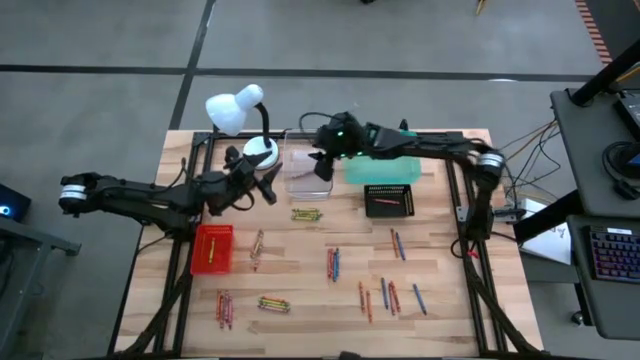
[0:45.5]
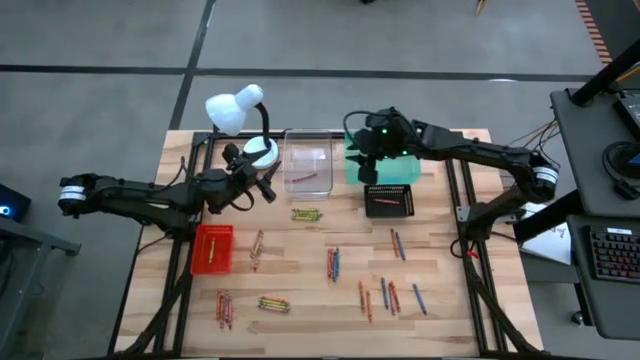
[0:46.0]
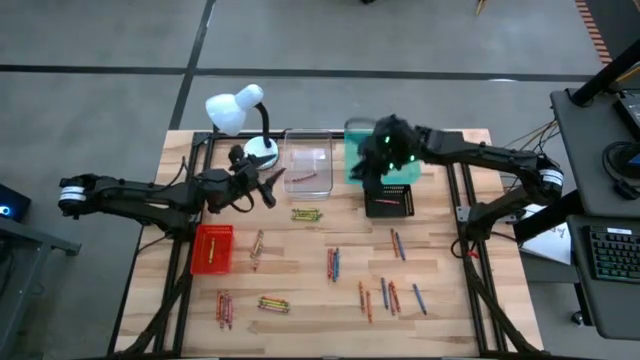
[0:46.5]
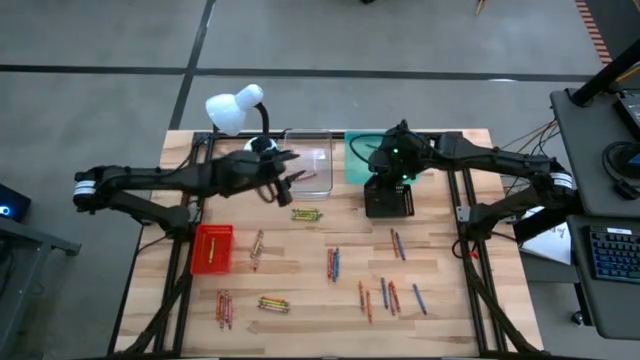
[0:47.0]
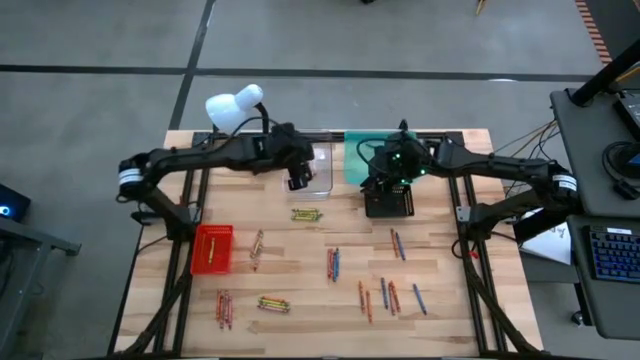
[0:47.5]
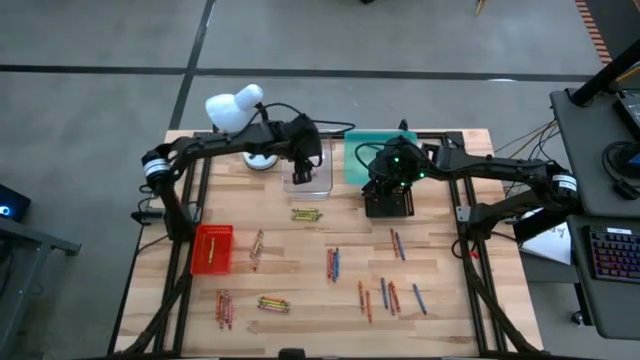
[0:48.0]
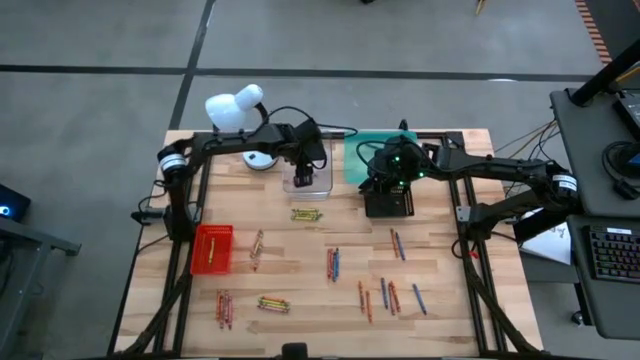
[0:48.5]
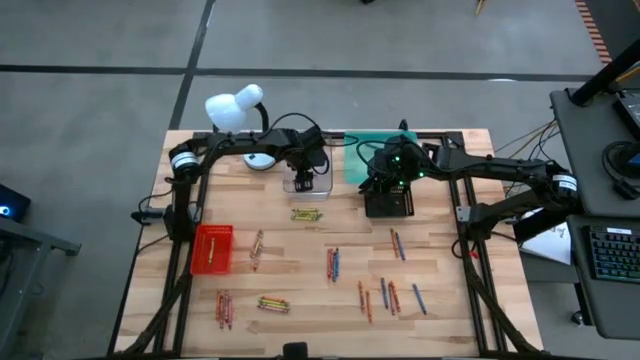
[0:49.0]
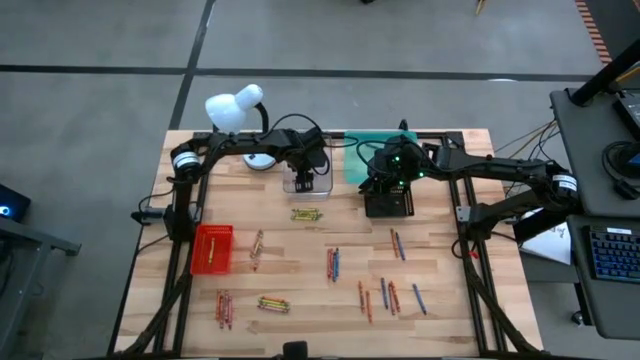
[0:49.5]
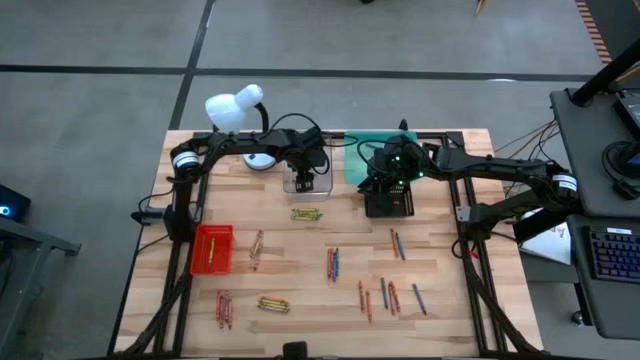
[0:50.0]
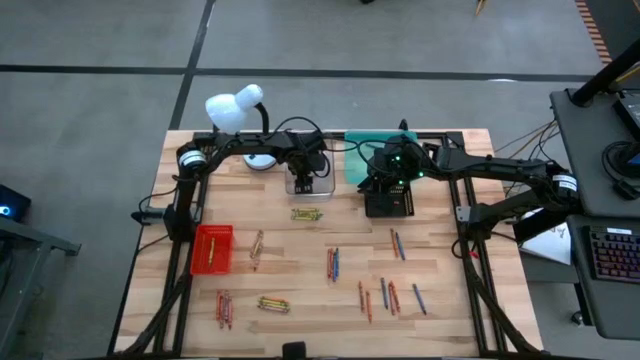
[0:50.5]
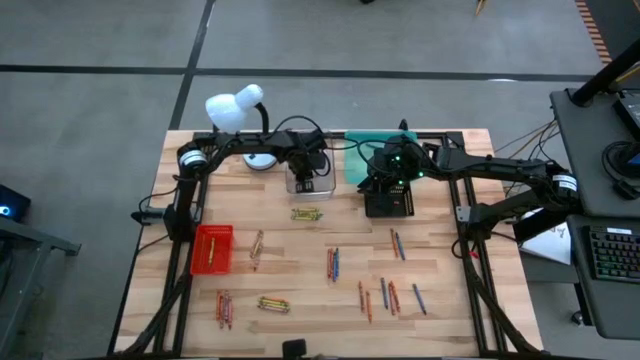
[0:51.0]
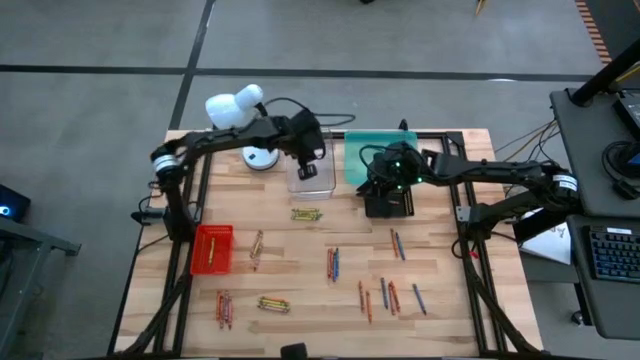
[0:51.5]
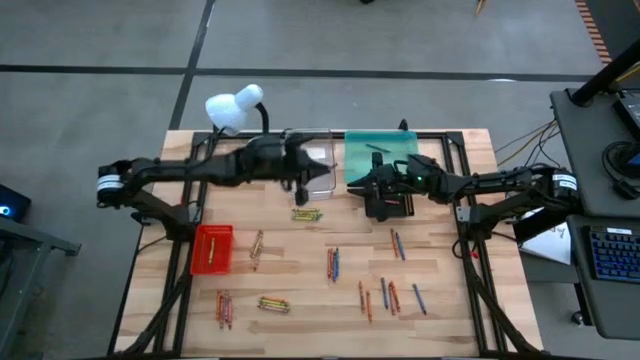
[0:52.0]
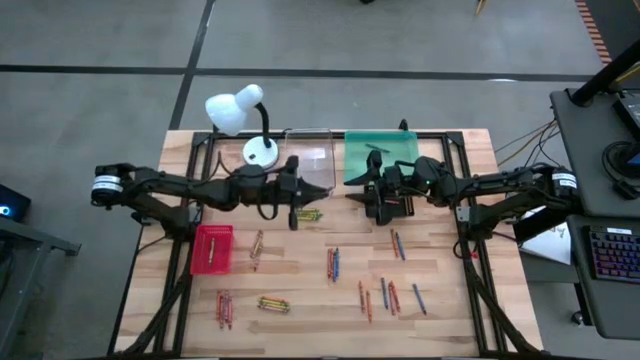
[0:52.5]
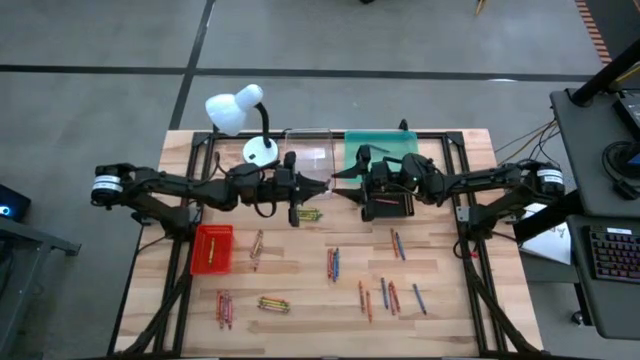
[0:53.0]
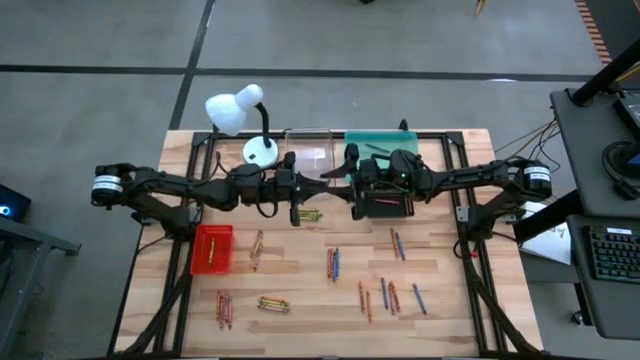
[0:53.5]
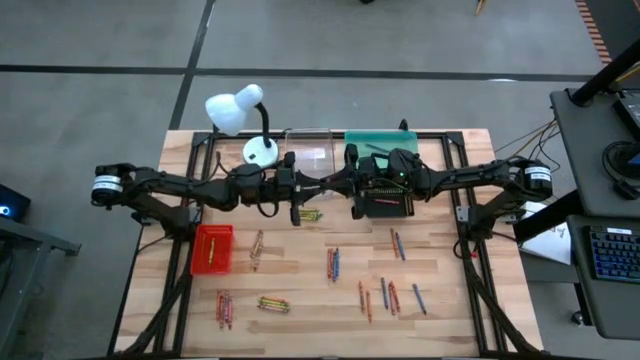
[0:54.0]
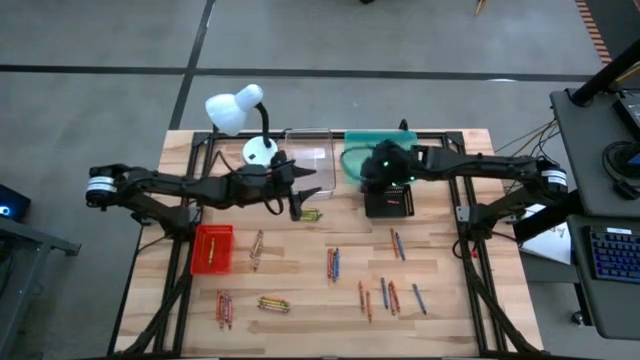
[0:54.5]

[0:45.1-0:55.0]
Task: Sort crayons
Put the red crayon into the black bin

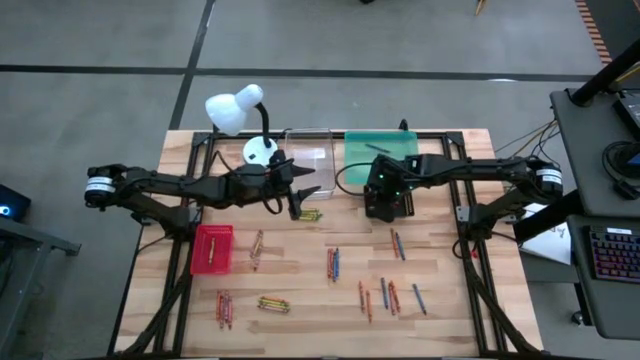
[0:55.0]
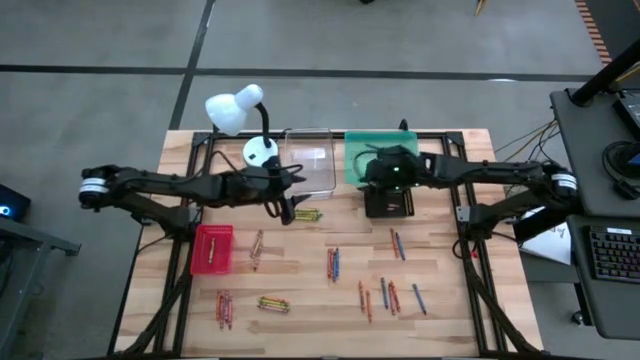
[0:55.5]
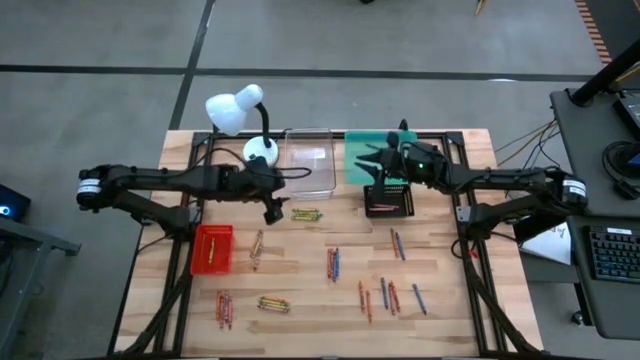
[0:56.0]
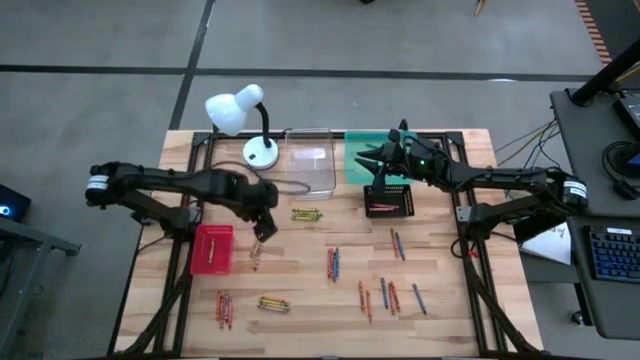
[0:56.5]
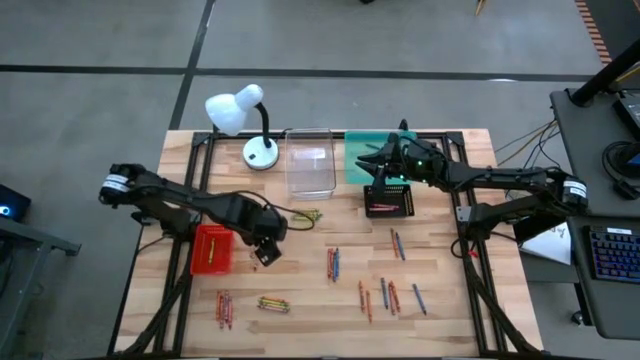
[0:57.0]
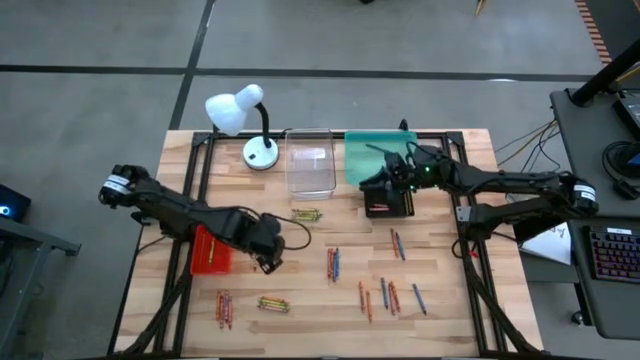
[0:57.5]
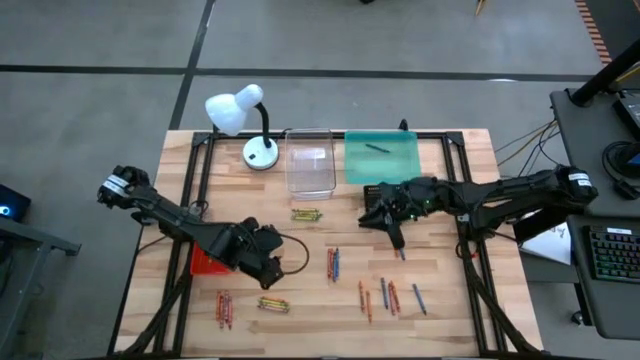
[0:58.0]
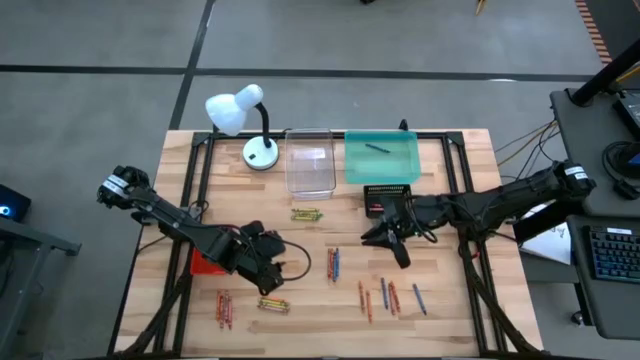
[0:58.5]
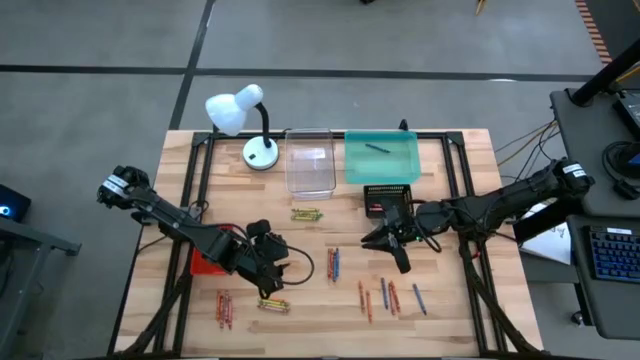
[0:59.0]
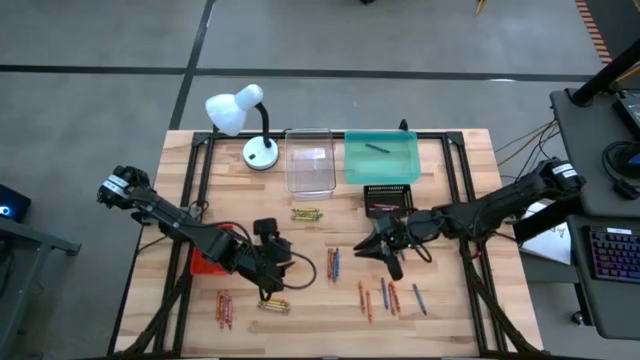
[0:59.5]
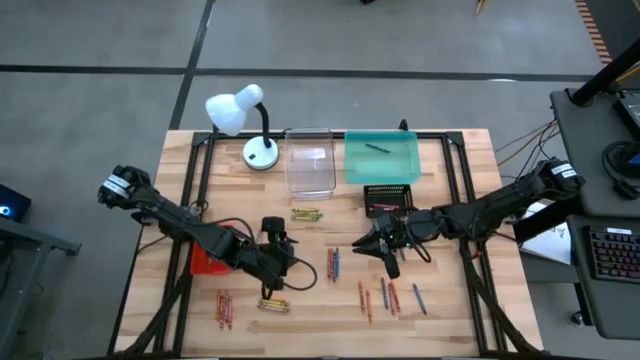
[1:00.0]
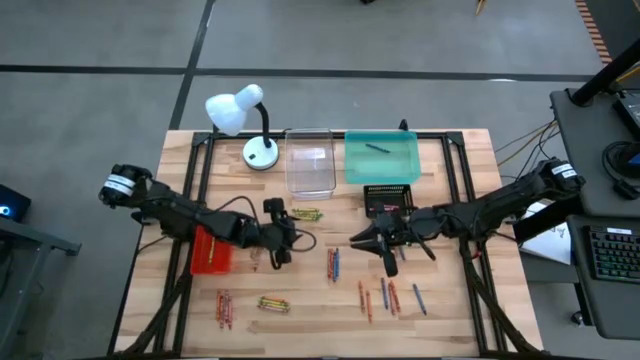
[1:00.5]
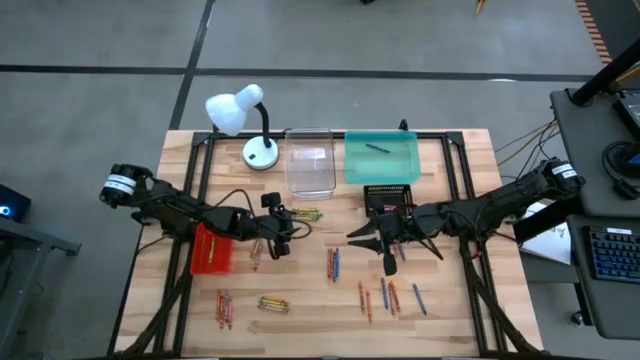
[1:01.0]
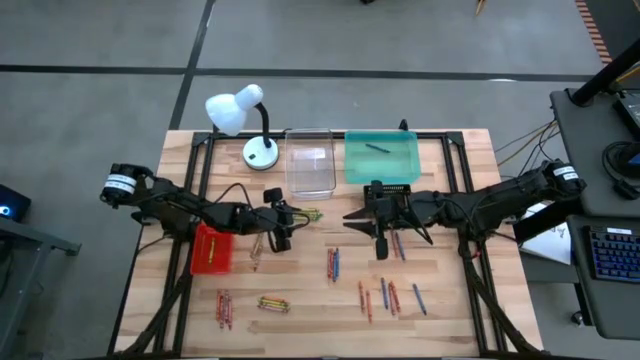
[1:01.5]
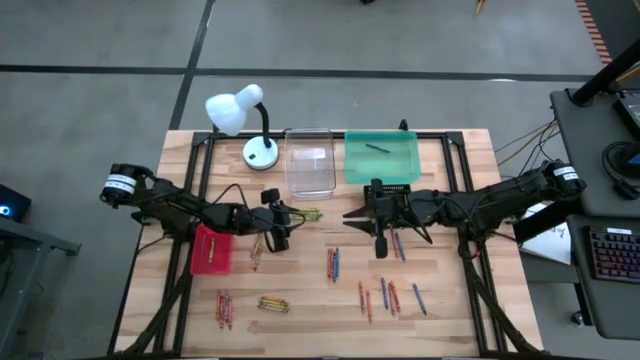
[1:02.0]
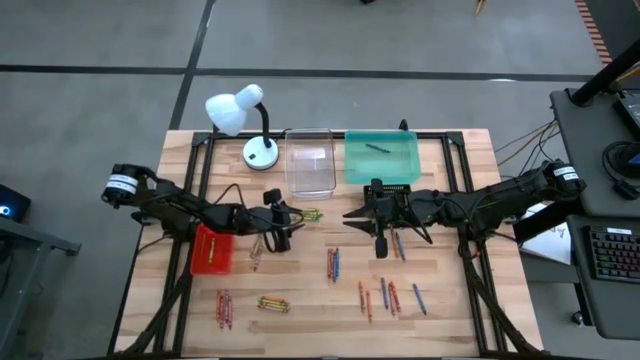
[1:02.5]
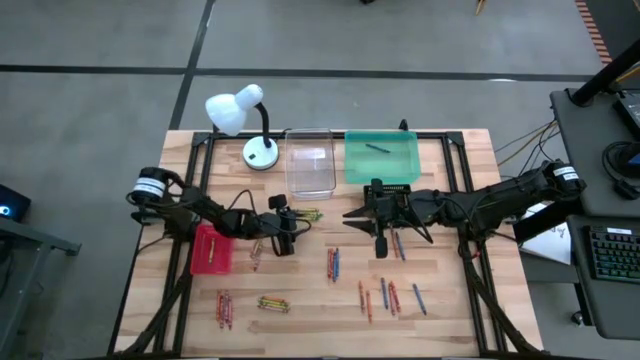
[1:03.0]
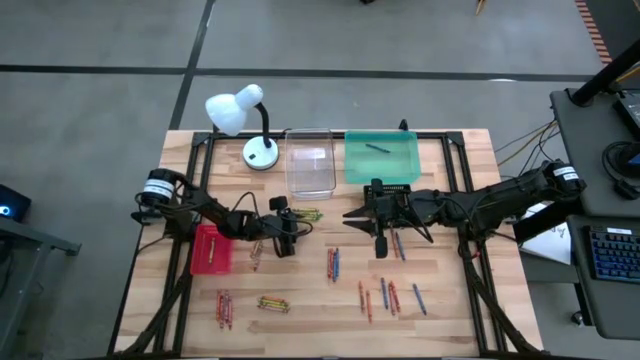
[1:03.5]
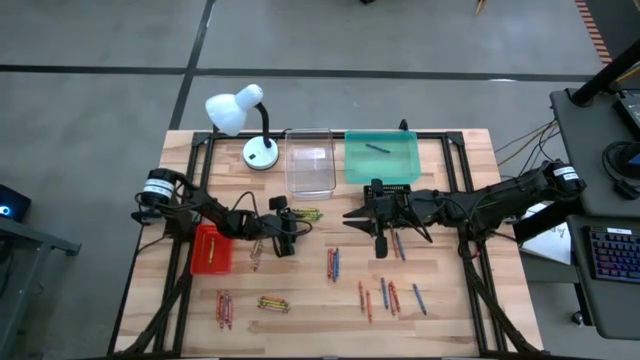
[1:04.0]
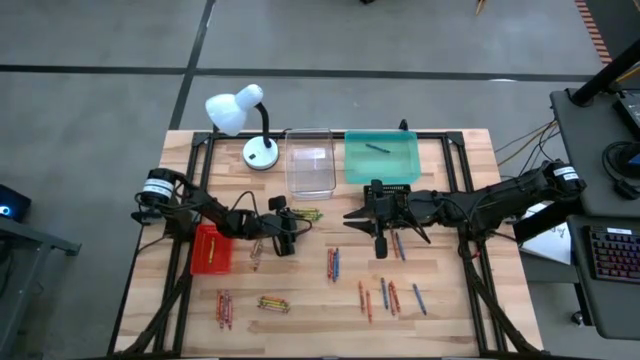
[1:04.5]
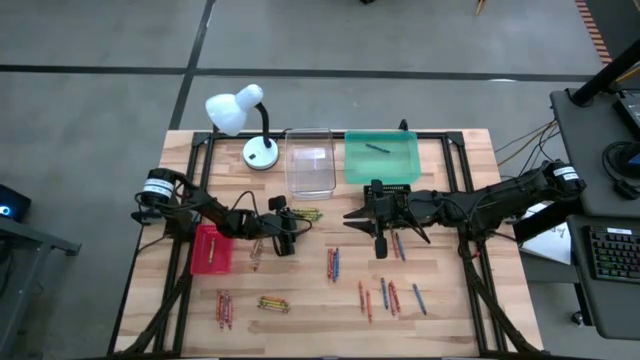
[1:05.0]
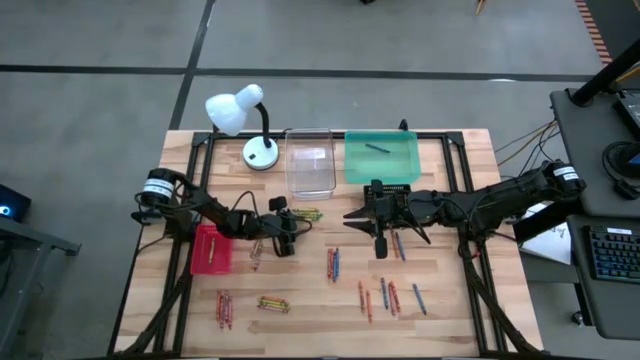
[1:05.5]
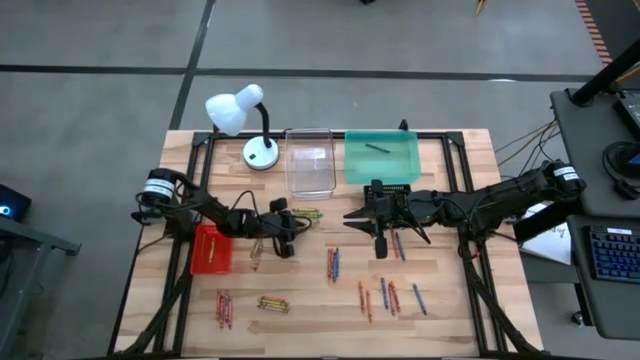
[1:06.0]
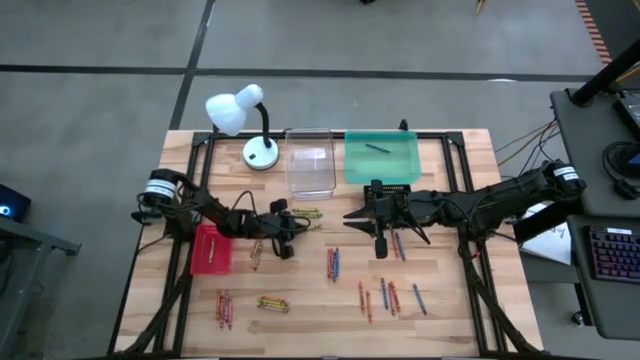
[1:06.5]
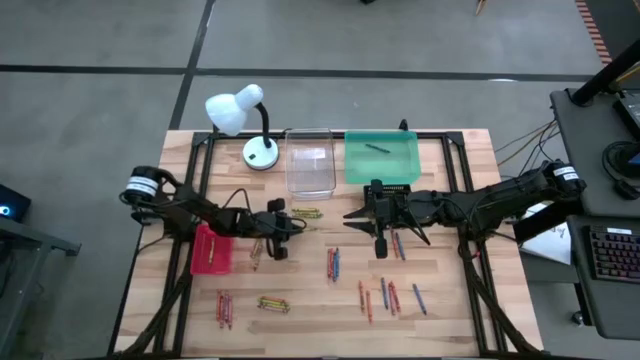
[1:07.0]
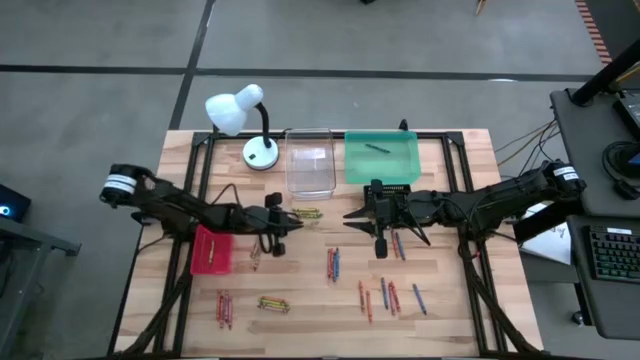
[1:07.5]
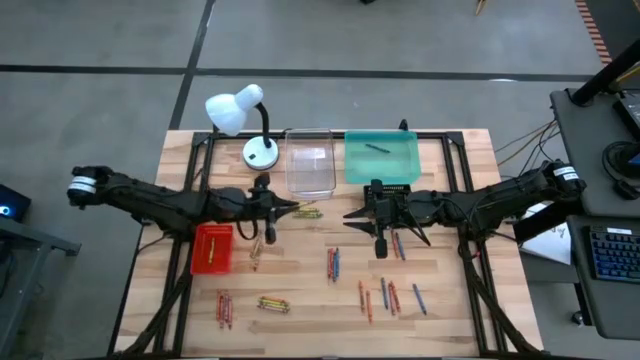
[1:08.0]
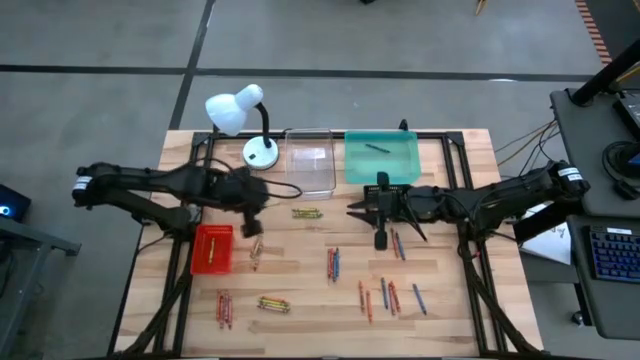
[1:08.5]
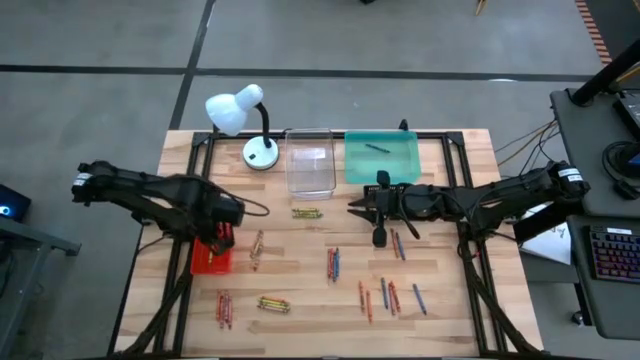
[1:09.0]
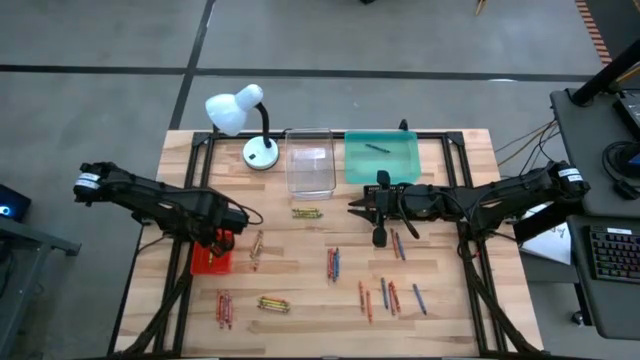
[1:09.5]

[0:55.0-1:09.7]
Put the green crayon into the orange bin
